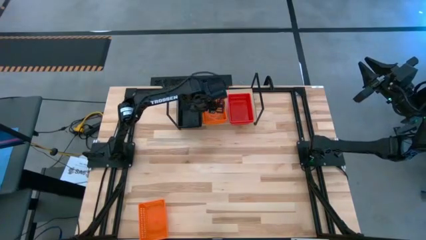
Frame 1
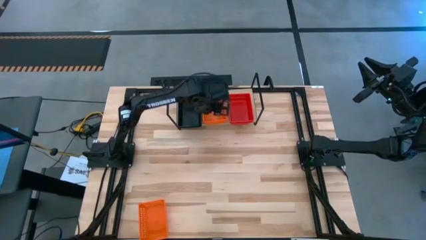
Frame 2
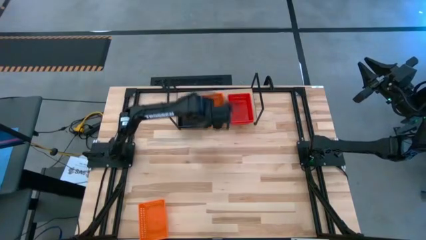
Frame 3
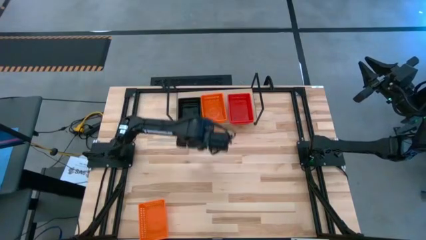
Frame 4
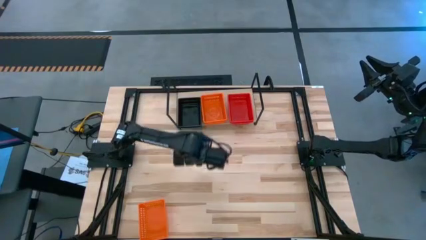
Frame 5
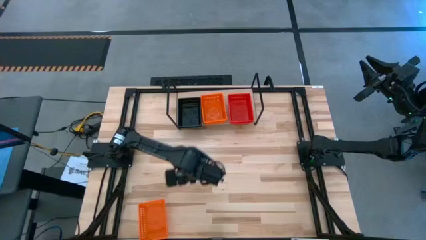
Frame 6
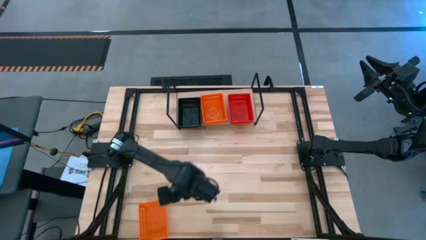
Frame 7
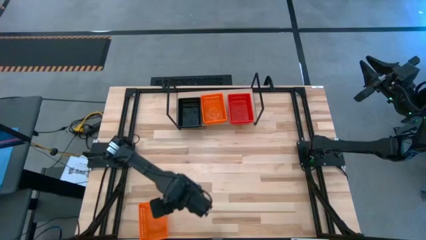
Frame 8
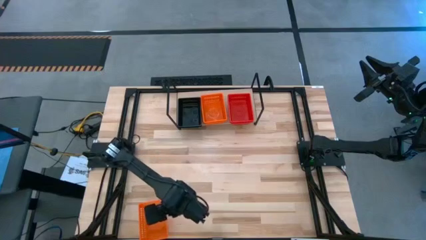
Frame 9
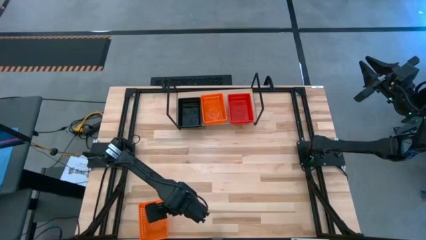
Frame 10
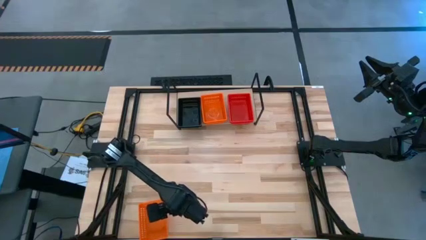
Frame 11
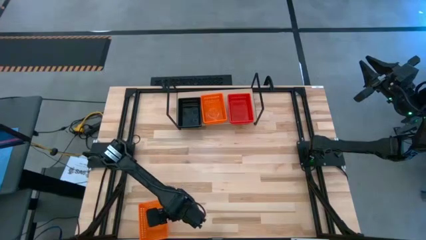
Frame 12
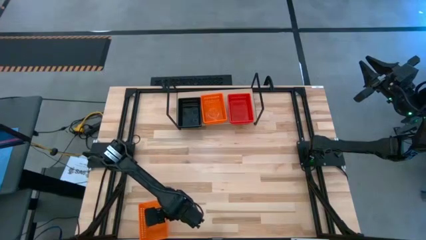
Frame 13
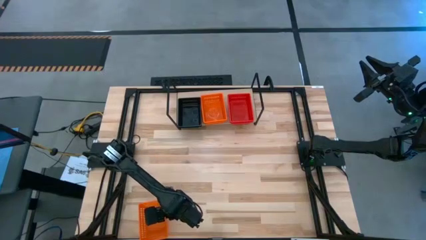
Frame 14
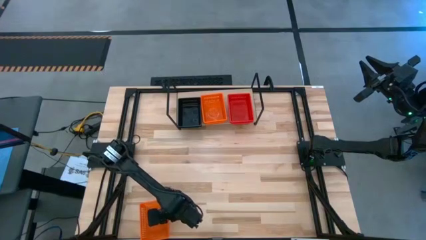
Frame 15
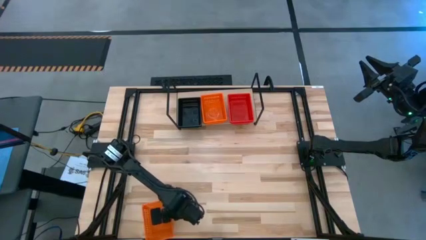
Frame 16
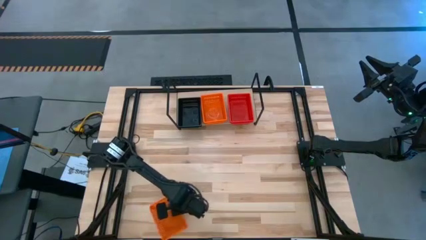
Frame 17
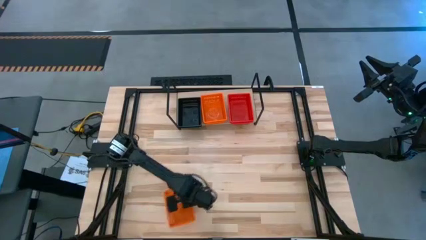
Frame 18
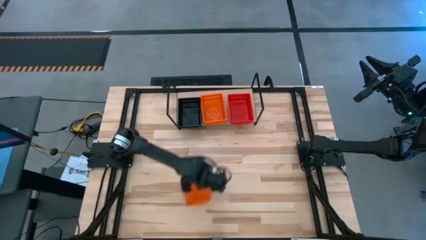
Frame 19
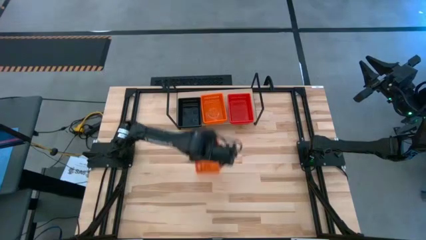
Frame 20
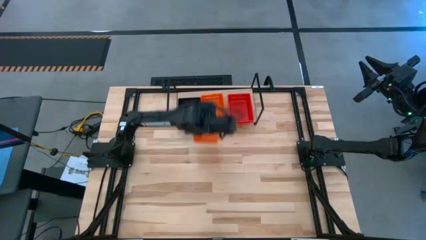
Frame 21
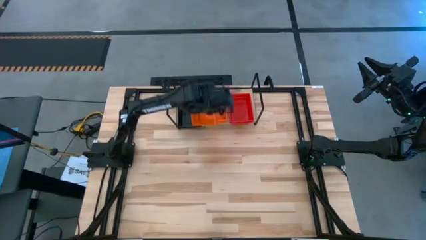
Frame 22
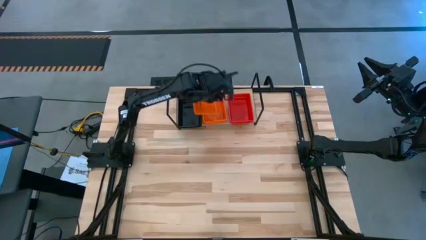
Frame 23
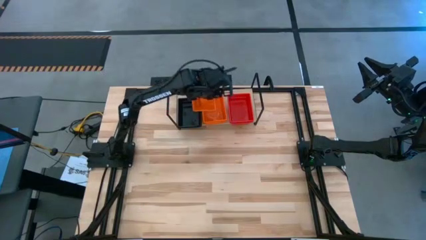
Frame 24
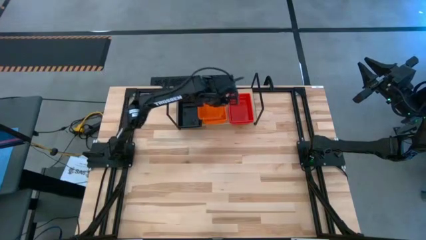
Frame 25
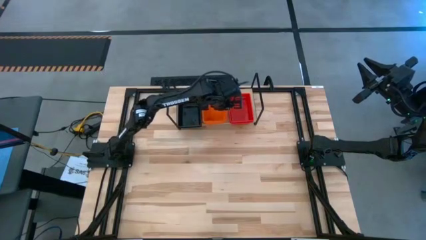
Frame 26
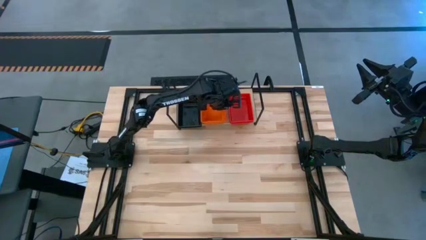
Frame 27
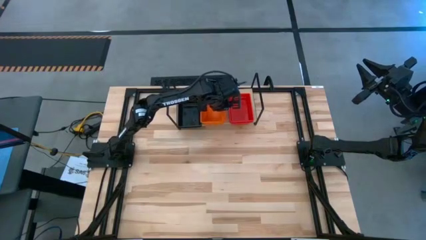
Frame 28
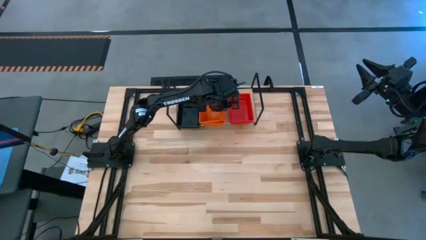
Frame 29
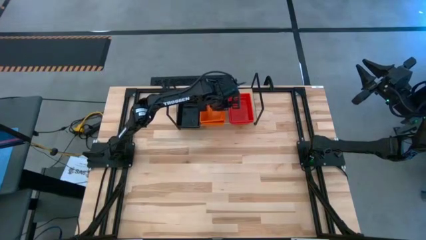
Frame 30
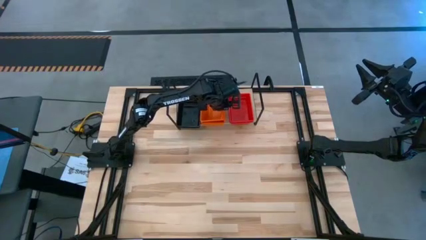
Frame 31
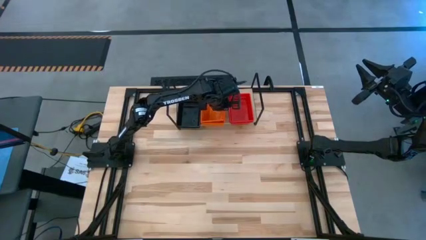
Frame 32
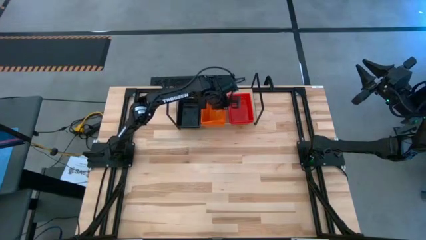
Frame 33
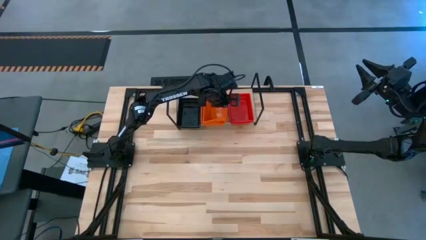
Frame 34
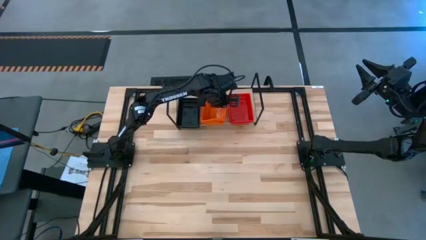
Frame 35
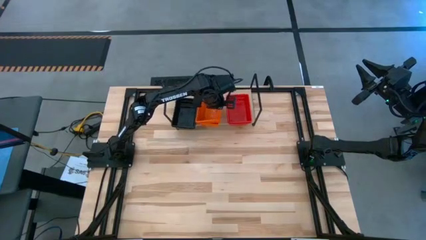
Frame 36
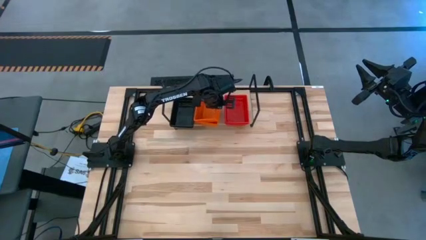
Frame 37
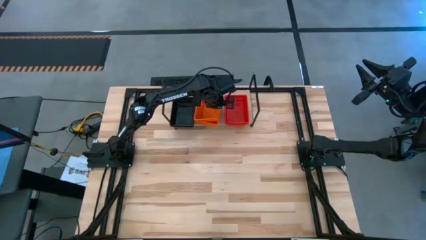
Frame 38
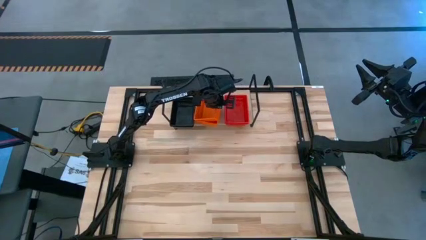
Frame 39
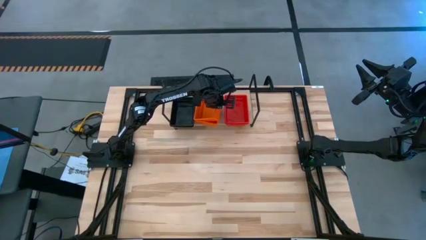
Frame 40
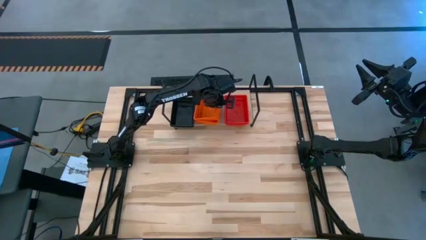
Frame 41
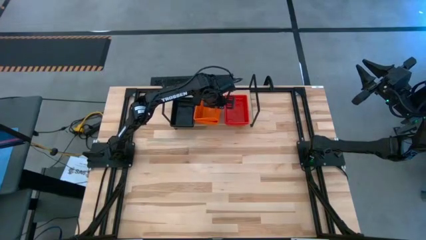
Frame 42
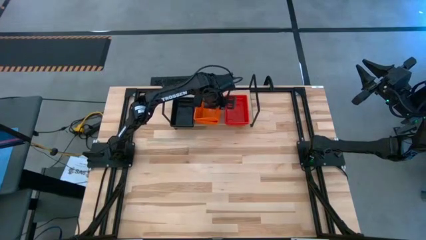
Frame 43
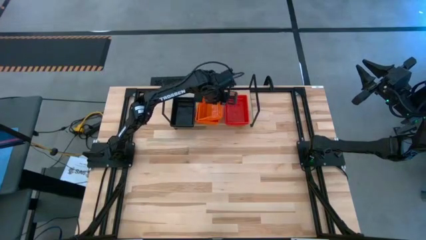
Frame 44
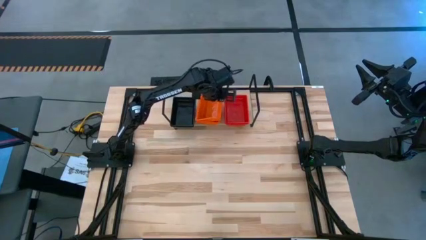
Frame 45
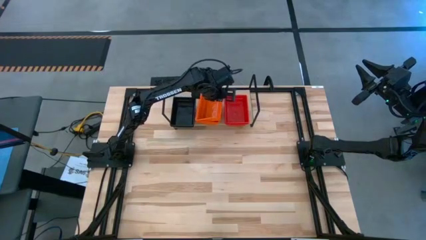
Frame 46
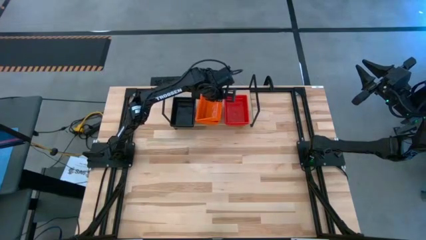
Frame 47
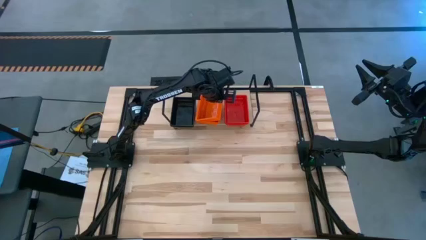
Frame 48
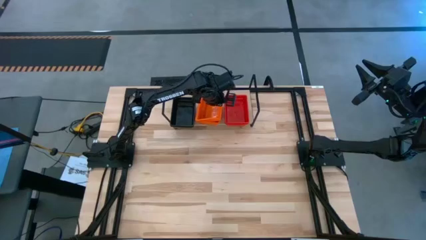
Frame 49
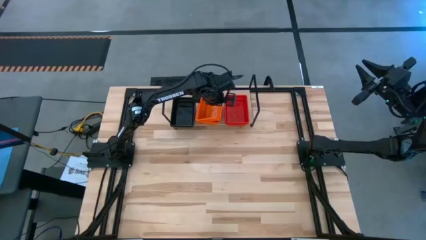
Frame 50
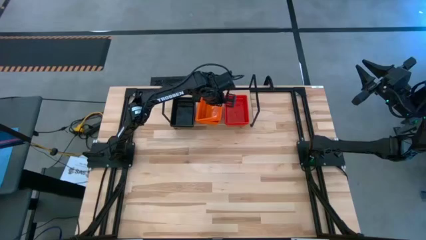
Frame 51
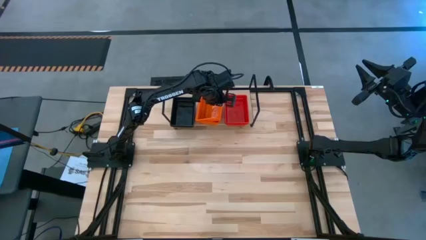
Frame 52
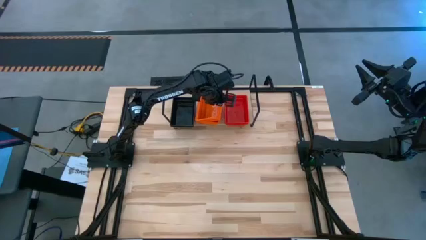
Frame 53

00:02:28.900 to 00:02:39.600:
Task: Stack baskets on shelf by color
Stack the orange bin on top of the other orange bin on the shelf
